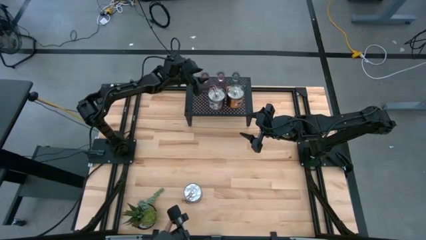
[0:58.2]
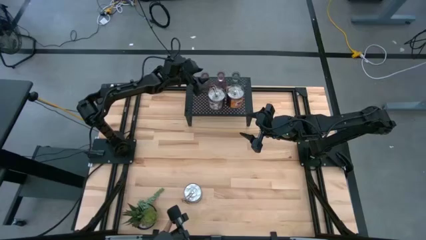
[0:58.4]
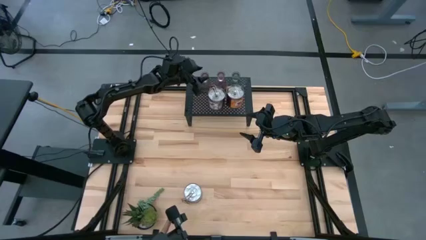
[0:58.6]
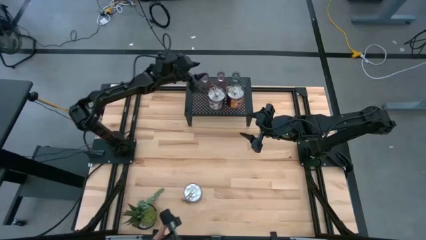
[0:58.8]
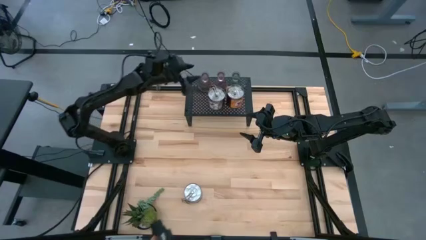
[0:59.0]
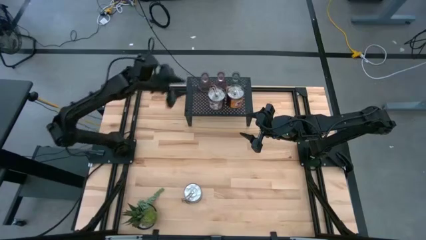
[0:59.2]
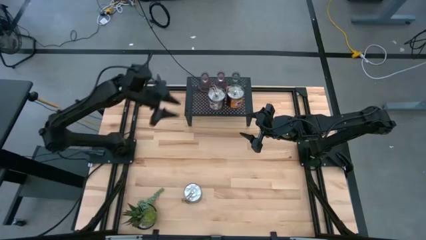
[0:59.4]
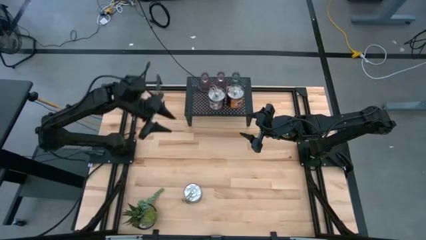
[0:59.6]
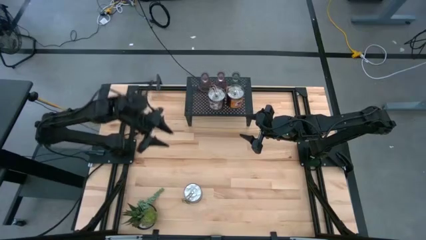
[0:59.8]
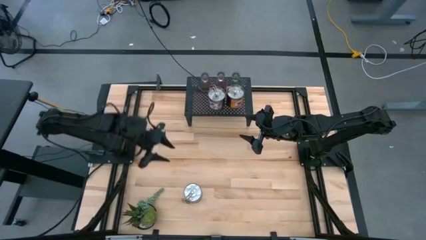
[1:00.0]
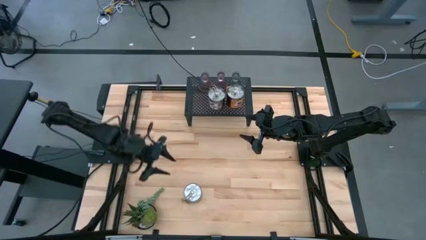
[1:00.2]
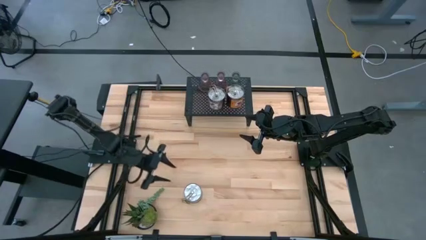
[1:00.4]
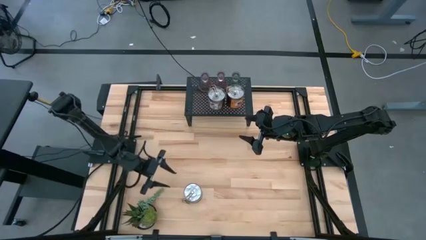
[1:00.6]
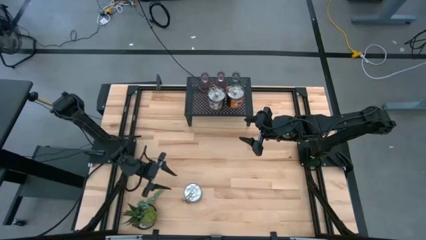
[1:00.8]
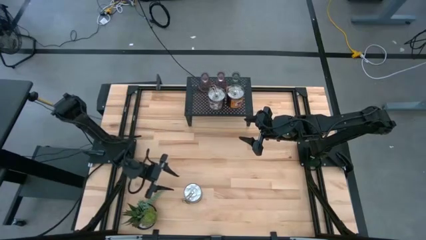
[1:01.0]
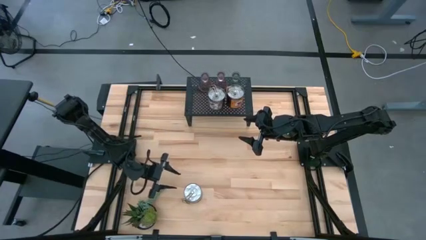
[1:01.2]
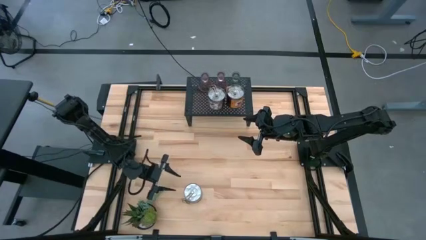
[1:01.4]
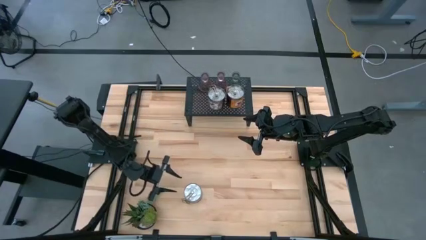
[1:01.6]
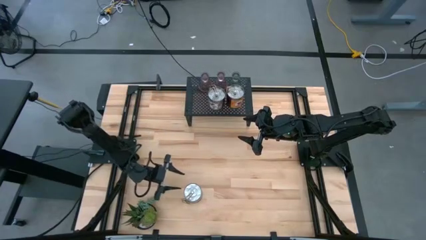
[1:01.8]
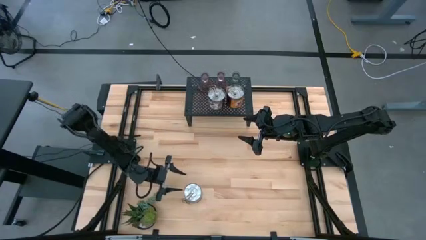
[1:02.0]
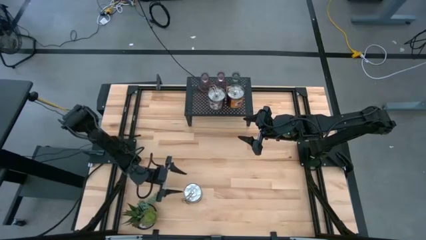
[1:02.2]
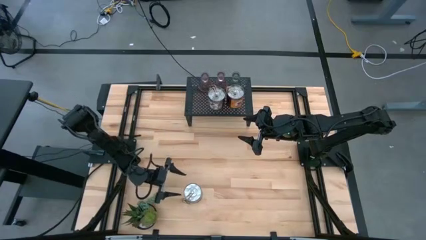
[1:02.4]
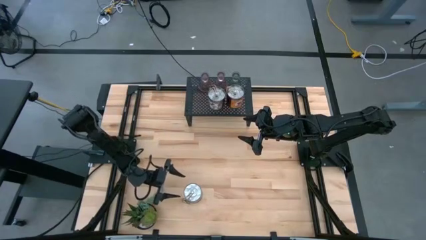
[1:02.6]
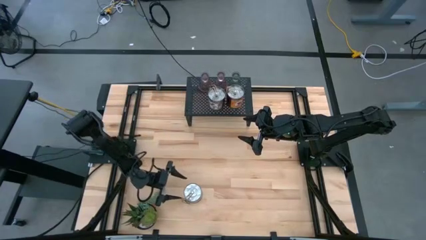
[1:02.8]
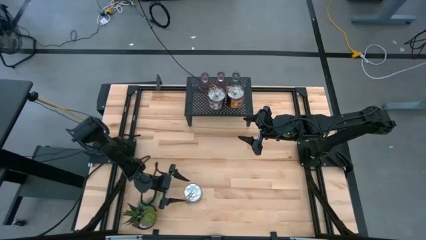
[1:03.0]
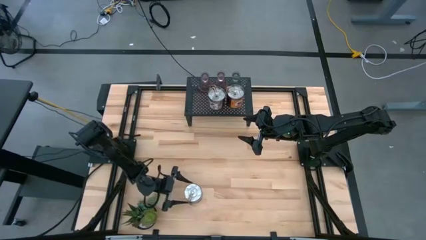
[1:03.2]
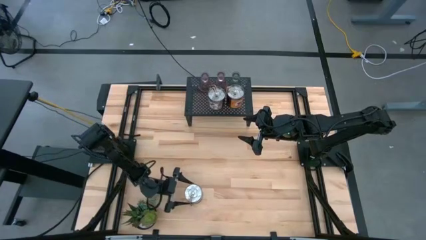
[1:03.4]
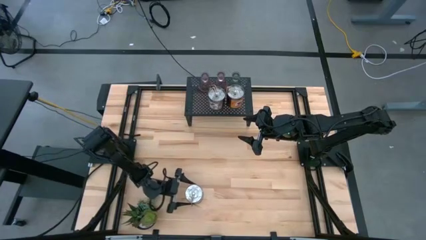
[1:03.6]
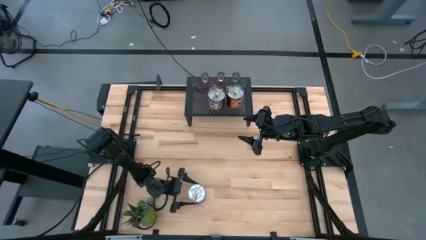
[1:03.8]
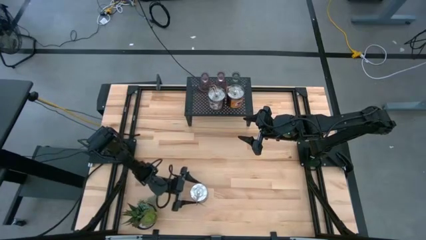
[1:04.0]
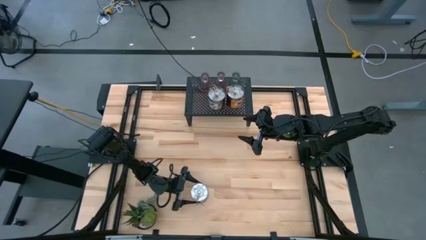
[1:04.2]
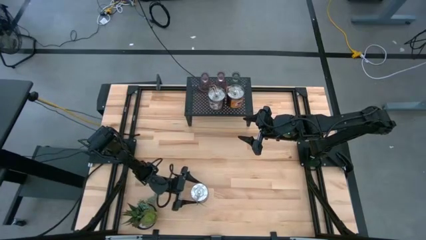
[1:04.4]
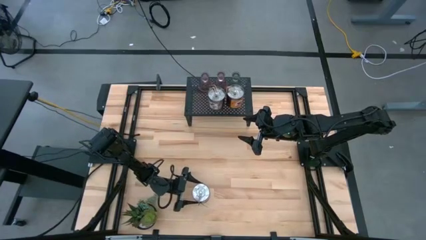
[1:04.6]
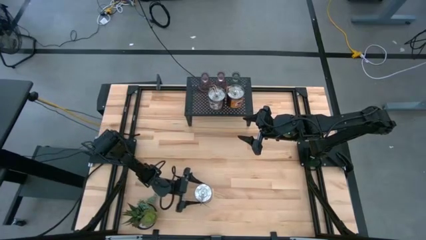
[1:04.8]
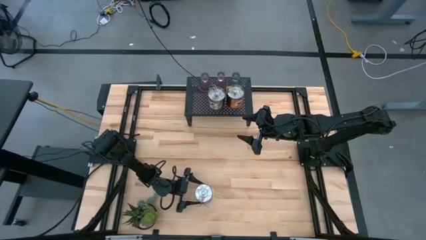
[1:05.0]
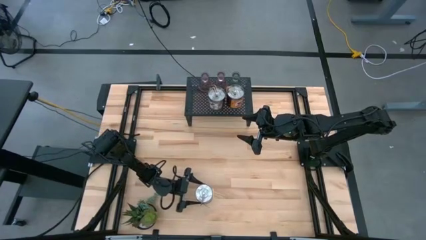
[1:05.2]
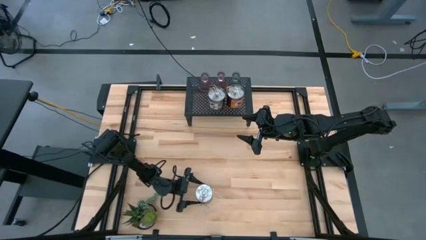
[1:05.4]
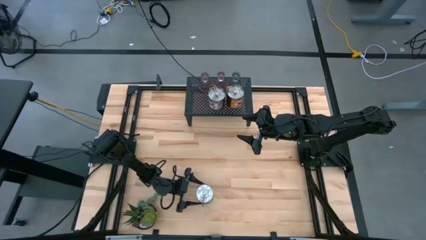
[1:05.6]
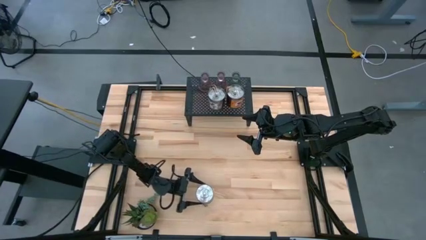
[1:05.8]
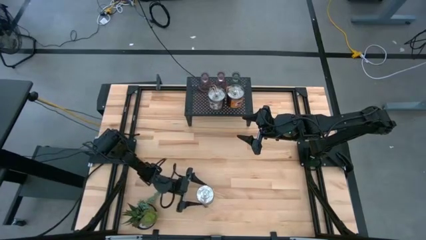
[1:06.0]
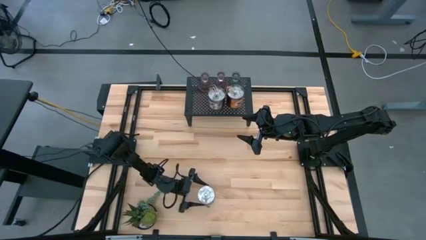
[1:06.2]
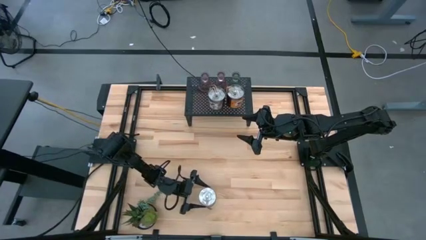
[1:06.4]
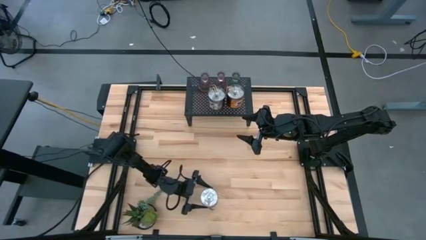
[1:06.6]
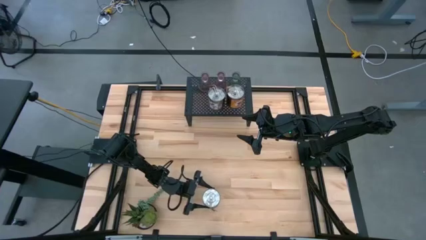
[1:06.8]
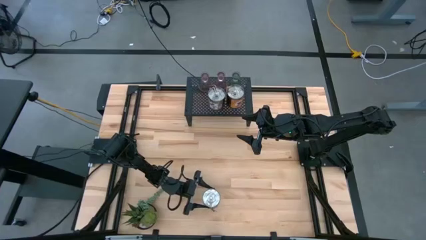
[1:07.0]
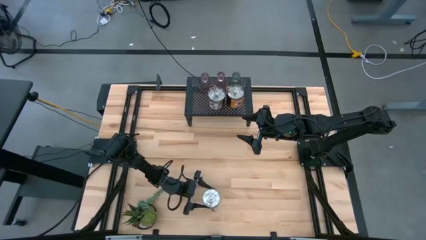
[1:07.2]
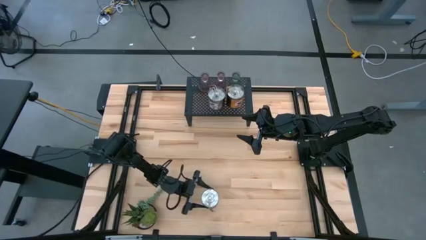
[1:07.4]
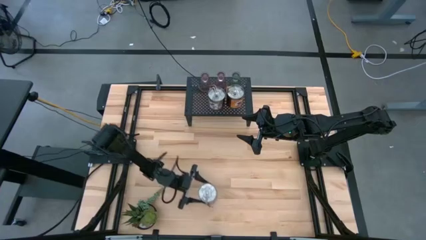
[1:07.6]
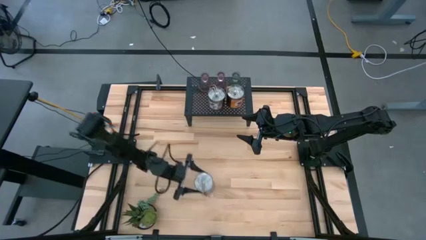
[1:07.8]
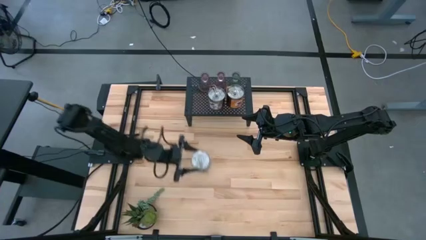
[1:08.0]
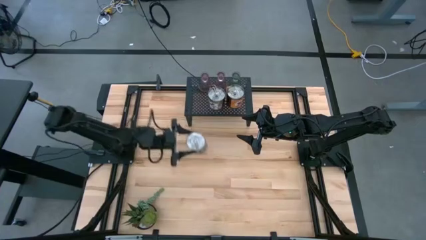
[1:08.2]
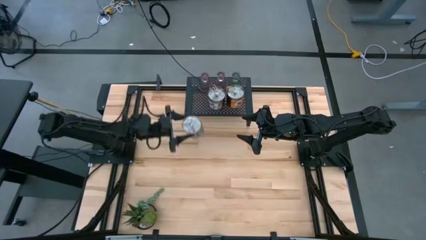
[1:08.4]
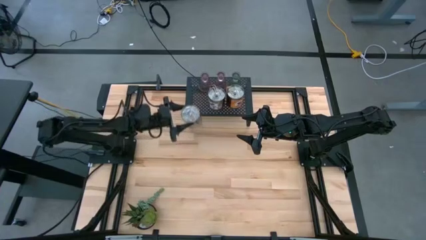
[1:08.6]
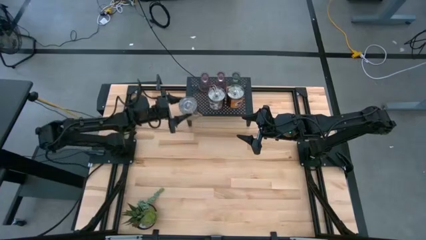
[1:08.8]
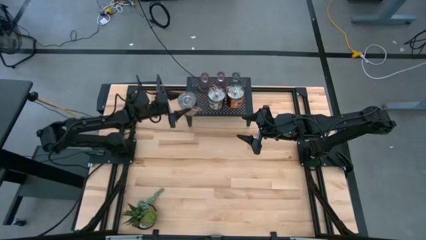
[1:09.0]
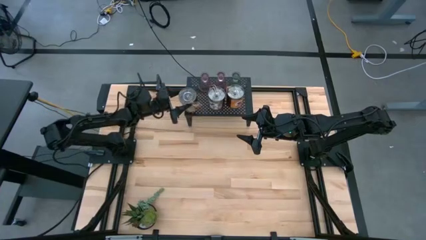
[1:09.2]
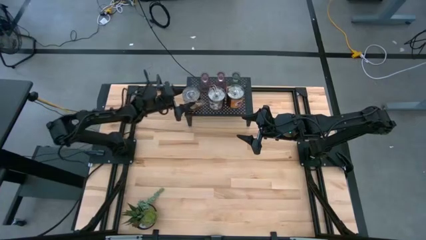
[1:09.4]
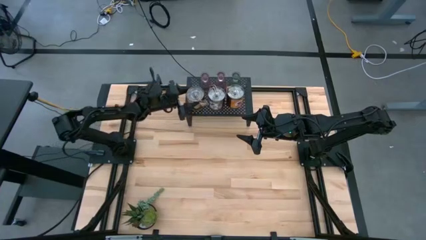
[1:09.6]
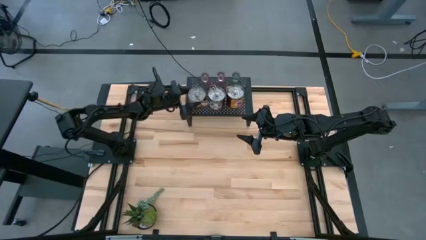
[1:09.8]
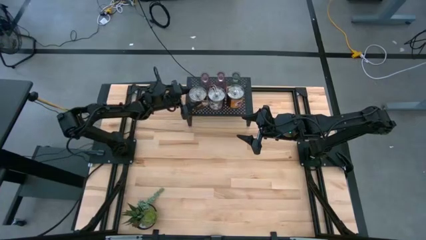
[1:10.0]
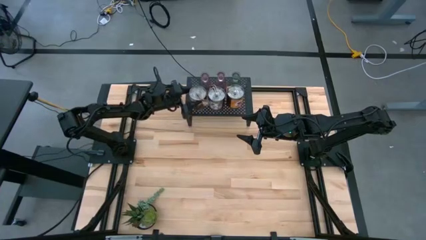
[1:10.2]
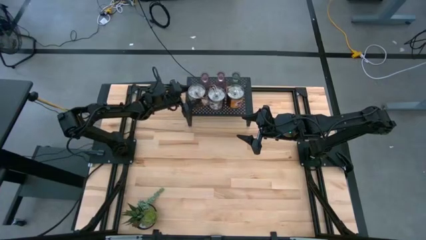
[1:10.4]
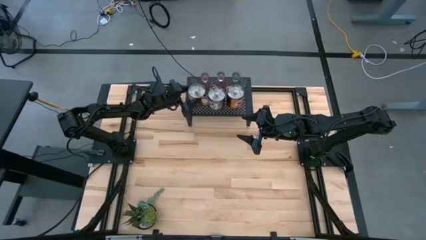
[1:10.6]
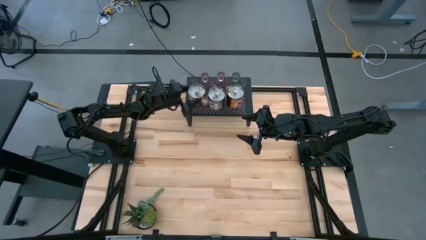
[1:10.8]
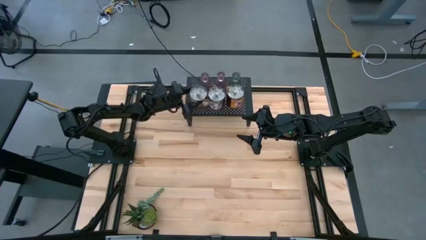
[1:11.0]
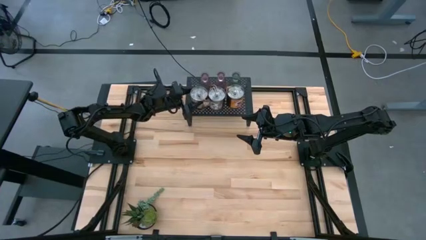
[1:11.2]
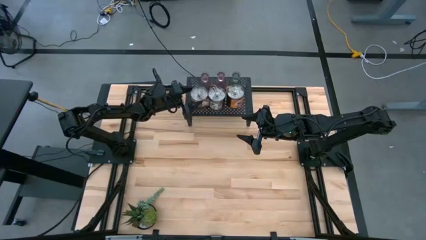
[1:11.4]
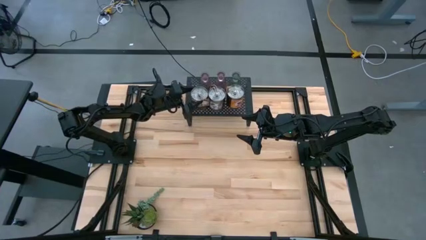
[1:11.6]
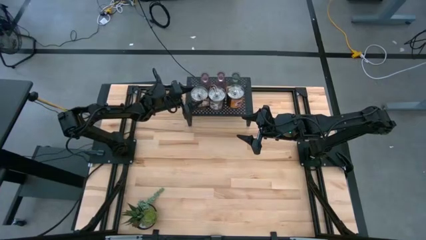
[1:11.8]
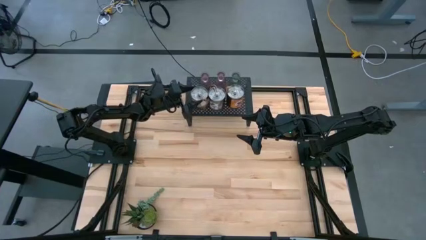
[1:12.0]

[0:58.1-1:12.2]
Task: Pick & Place candle stick holders
Align the silver scented candle with the silver scented candles on the shelf

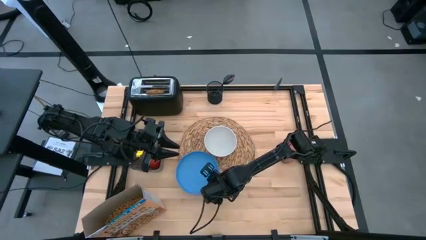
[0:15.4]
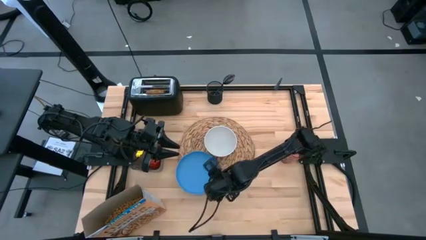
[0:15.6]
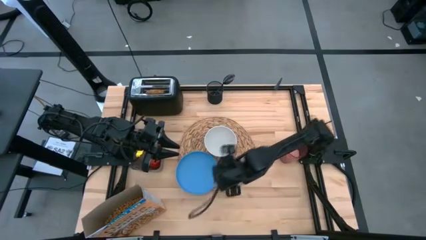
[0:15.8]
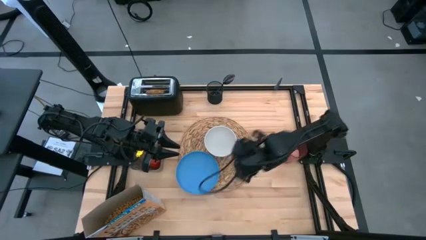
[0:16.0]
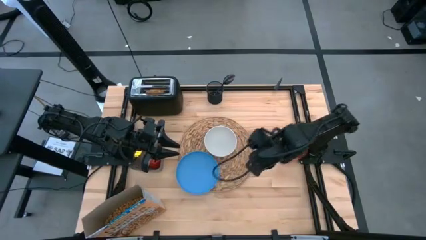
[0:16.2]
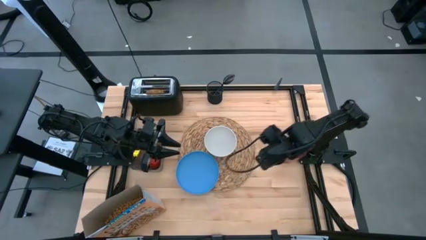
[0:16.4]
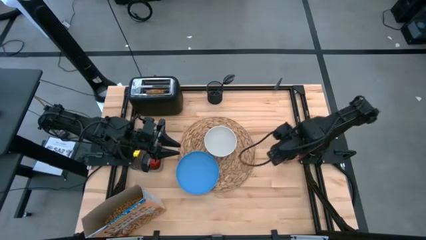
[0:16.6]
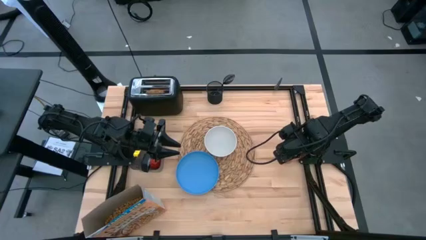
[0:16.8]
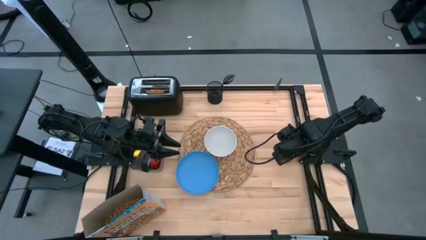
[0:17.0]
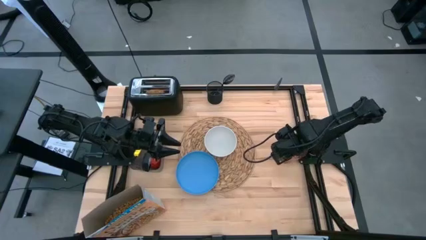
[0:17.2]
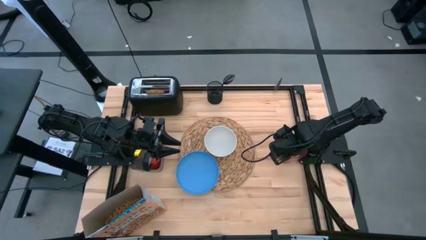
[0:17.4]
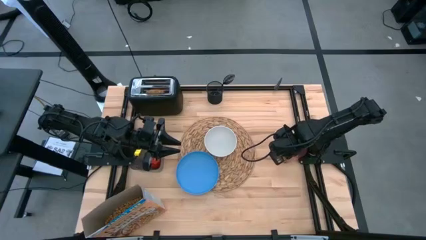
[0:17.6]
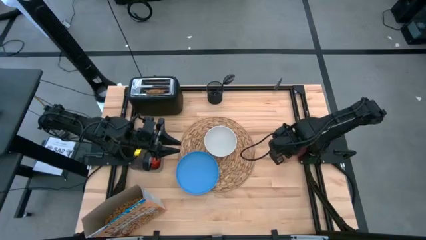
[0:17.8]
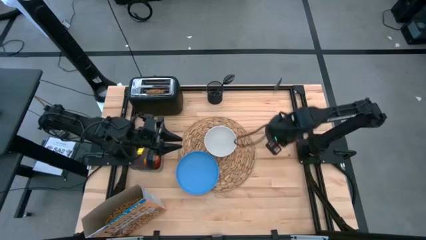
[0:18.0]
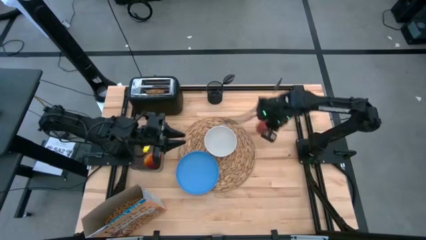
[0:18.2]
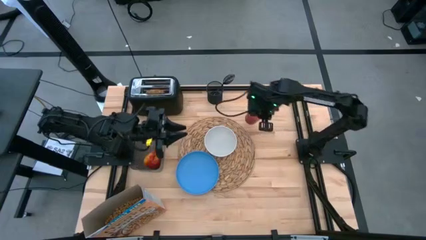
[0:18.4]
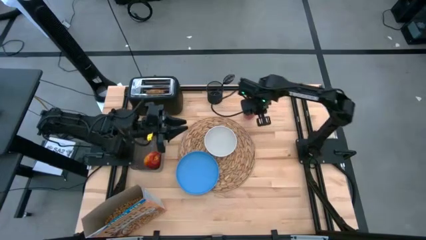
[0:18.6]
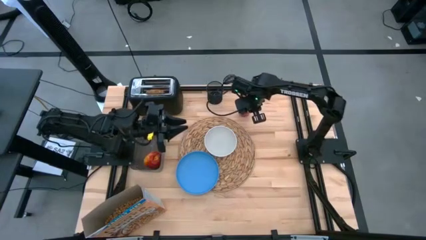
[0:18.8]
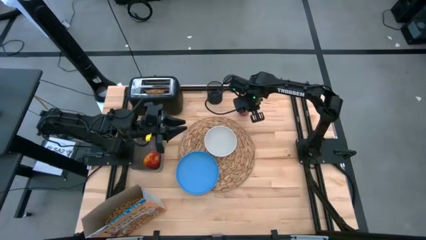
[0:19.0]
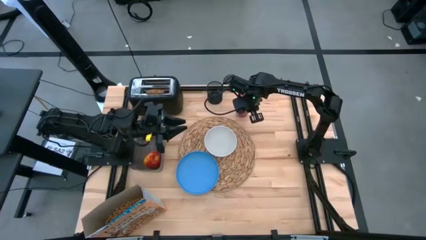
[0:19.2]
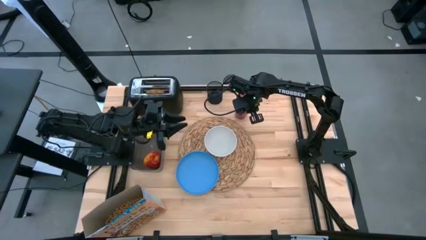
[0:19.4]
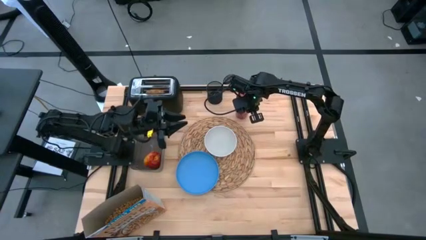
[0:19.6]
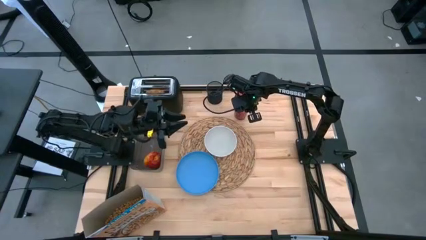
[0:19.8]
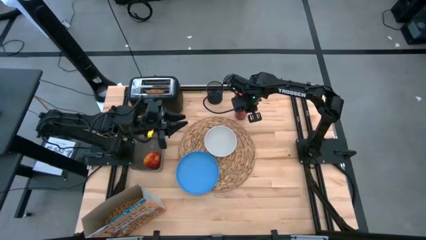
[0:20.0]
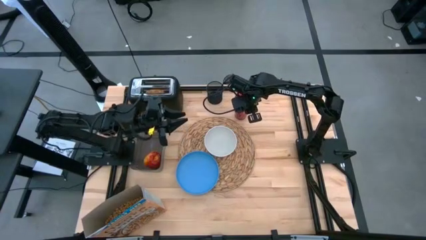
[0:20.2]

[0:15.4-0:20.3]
Task: Arrange a breakfast setting
Move the red cup of grain rice to the top right of the brown placemat
